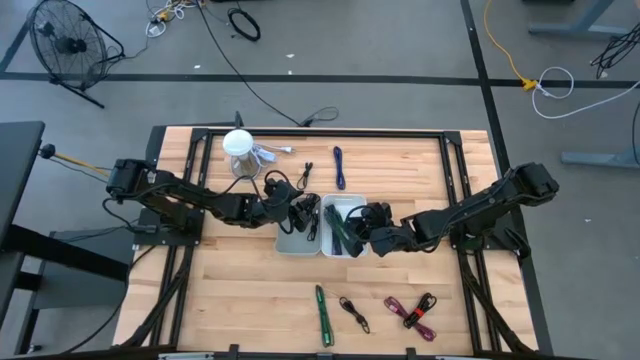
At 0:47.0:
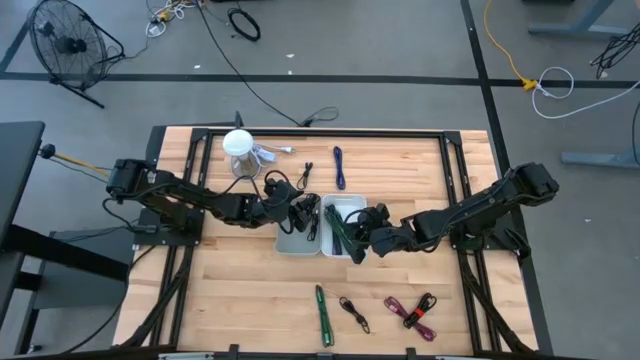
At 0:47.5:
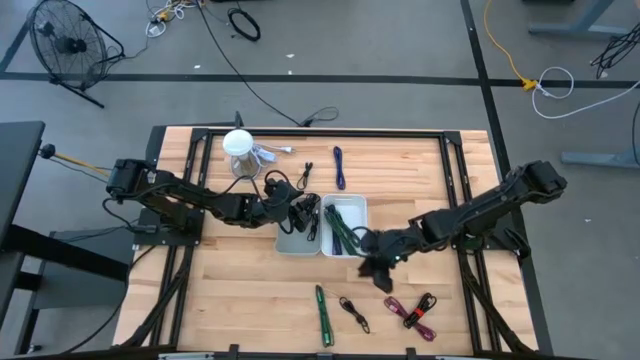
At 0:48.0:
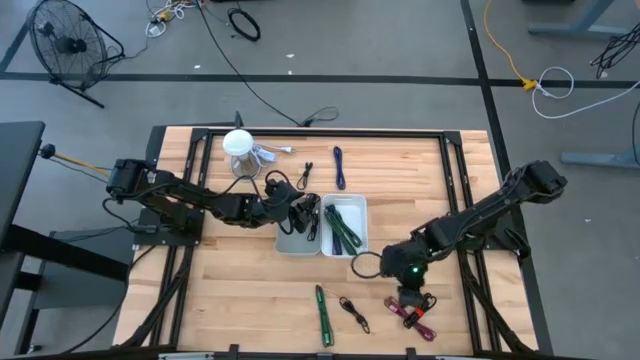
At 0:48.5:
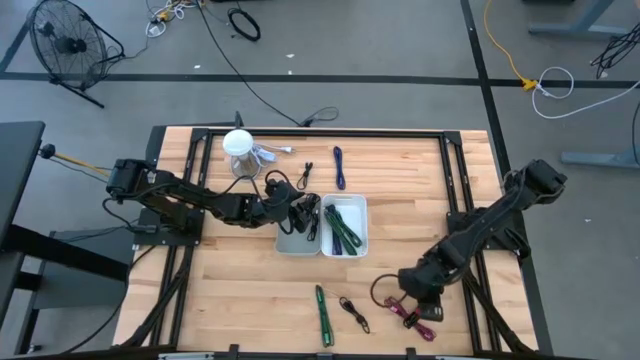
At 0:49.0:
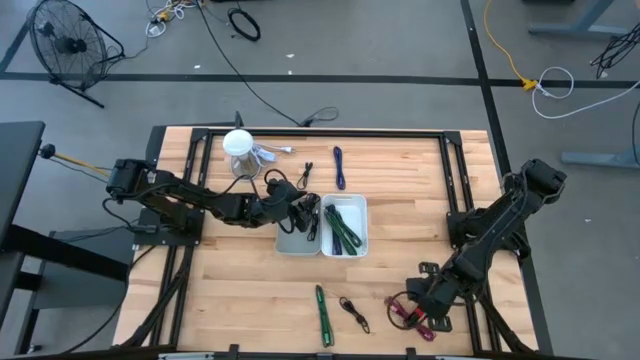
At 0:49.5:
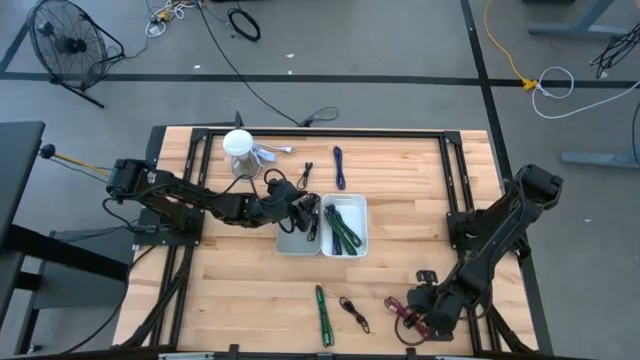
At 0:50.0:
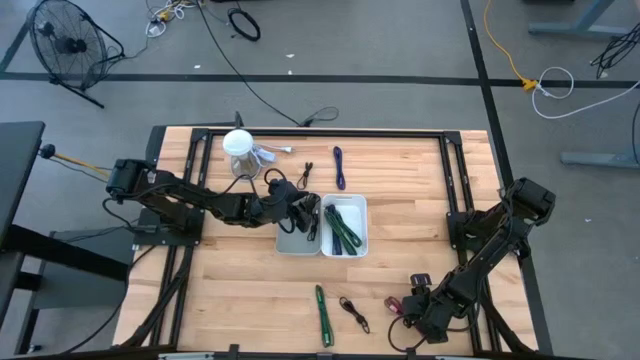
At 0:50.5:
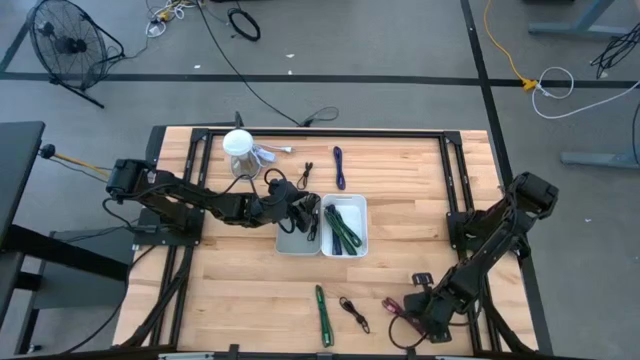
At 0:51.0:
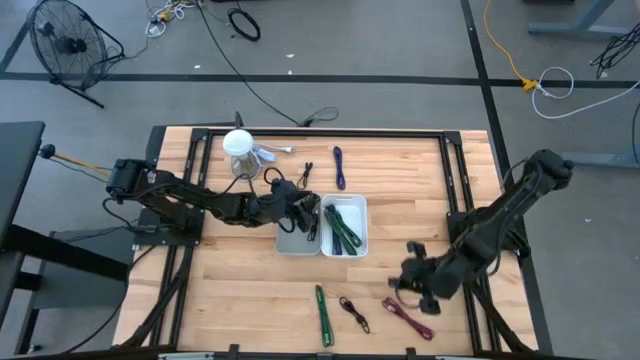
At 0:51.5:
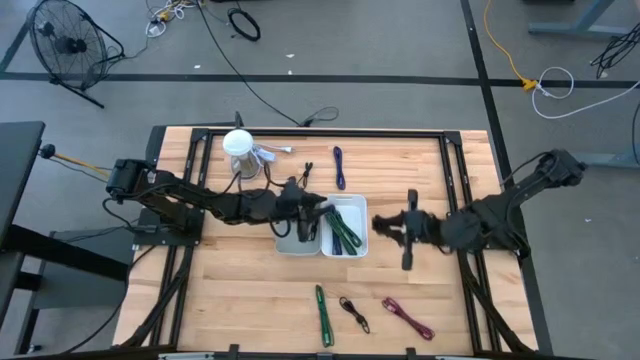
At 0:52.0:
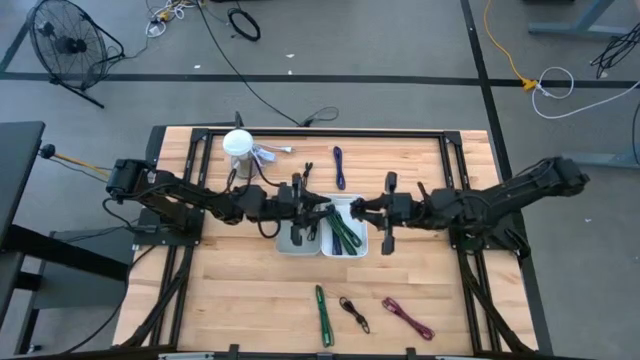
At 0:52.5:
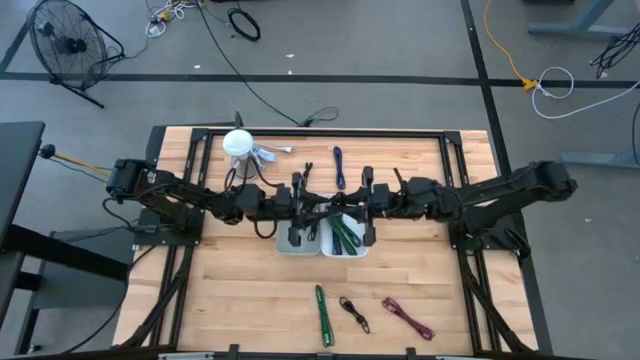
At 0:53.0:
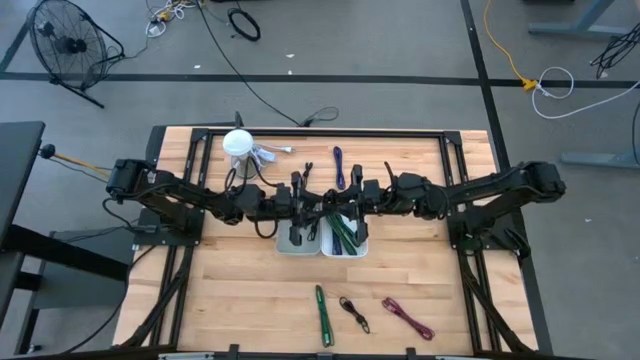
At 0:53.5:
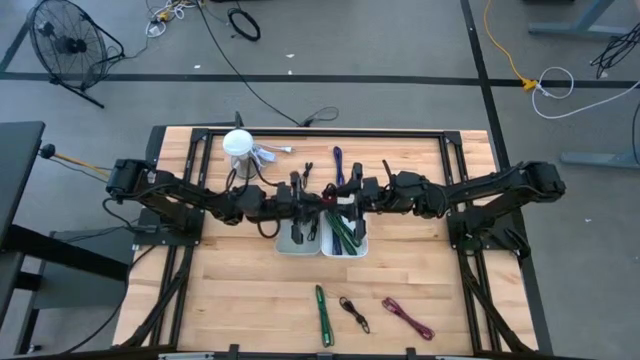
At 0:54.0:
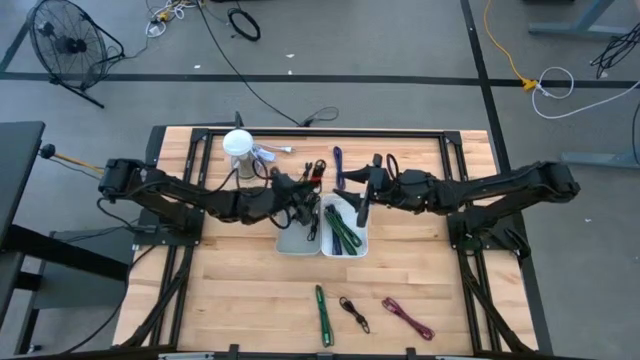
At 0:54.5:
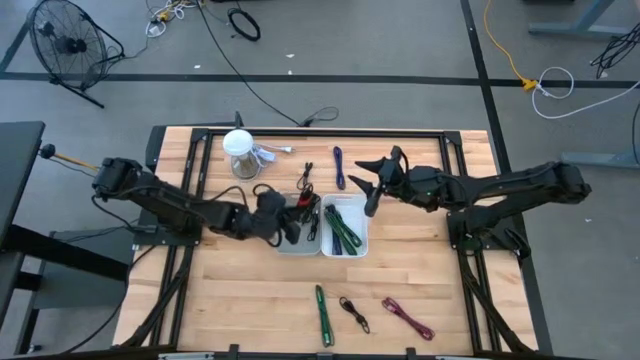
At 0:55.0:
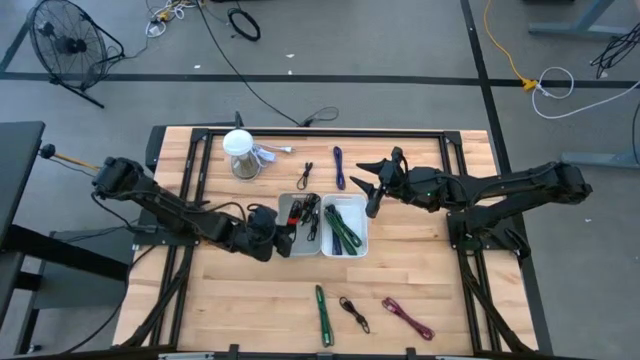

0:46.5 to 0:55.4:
Task: Pick & Place USB Port
Put the black charger cable into the gray bin

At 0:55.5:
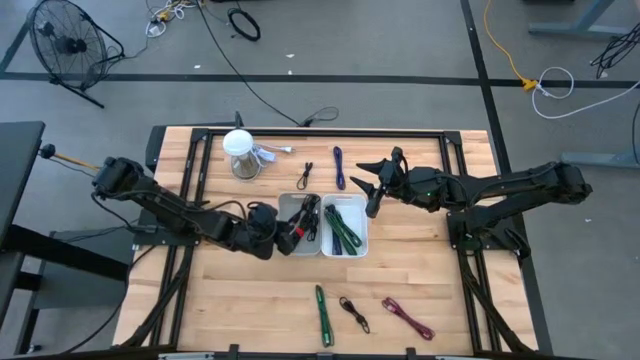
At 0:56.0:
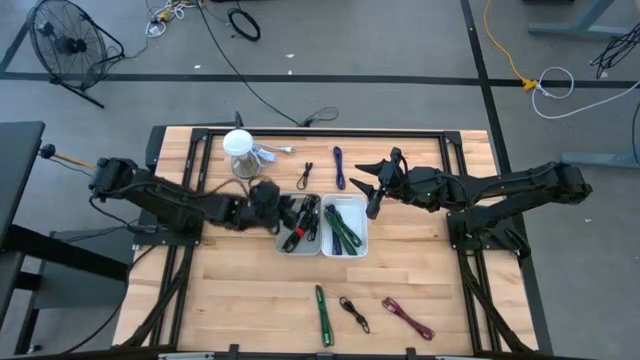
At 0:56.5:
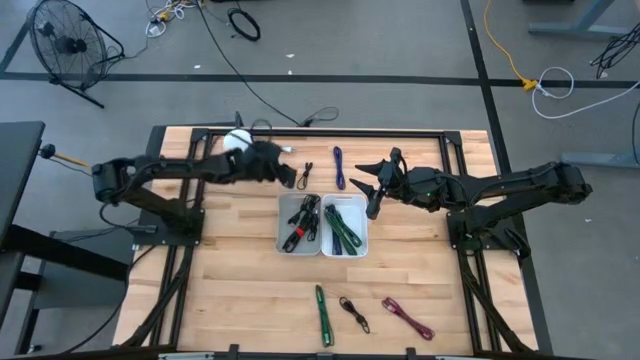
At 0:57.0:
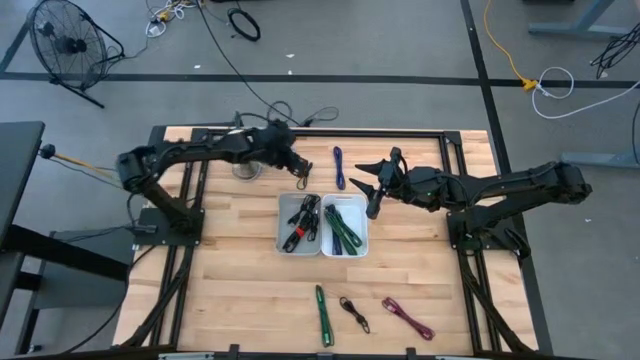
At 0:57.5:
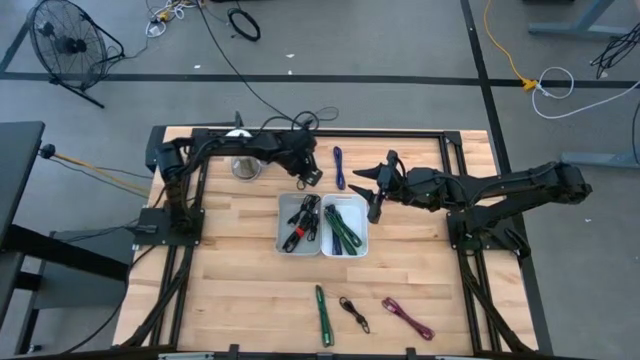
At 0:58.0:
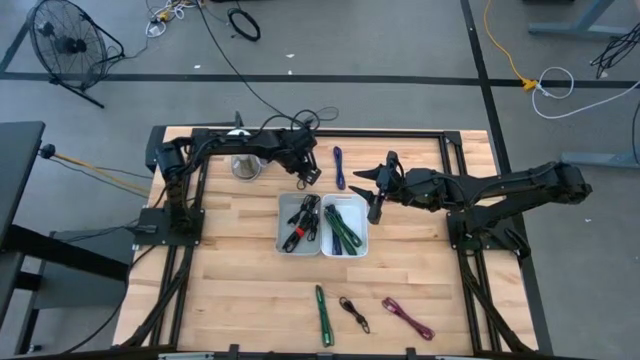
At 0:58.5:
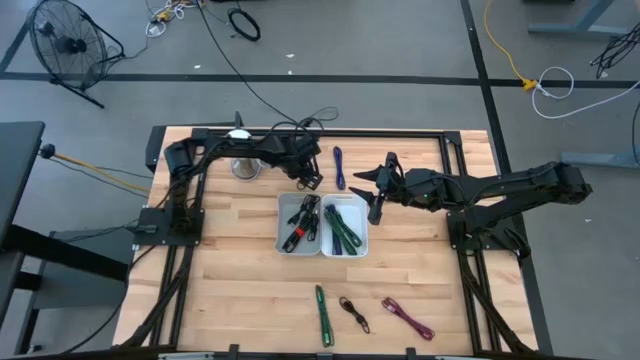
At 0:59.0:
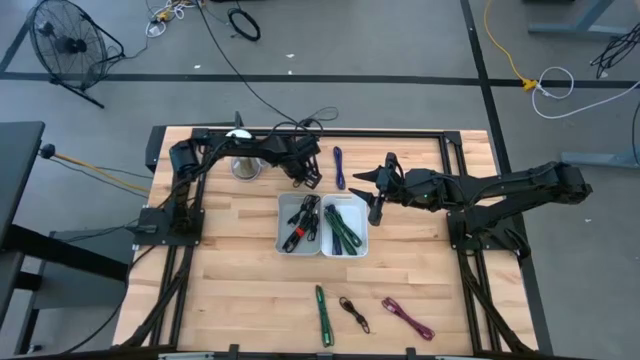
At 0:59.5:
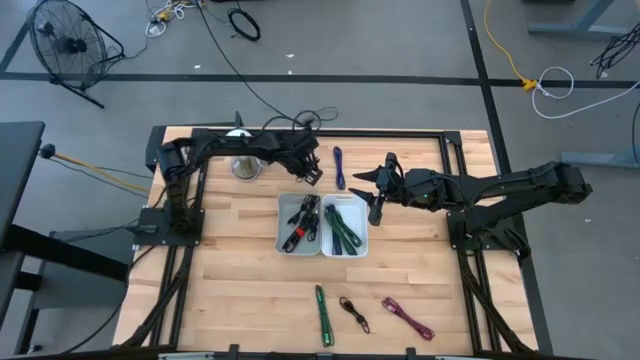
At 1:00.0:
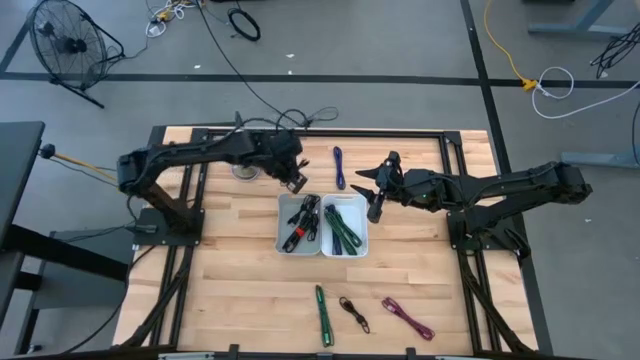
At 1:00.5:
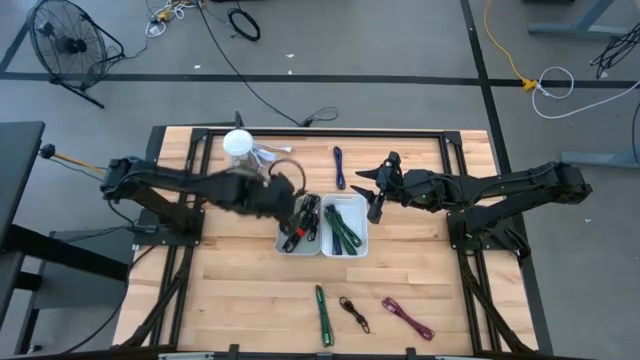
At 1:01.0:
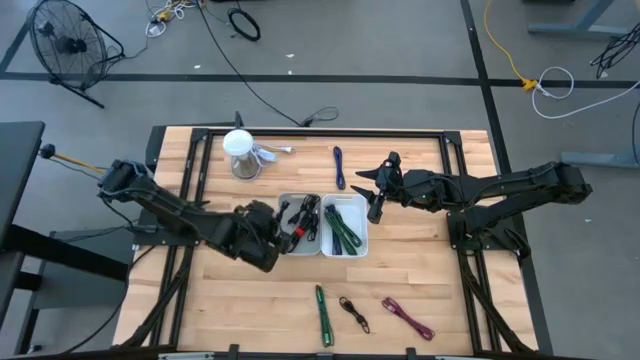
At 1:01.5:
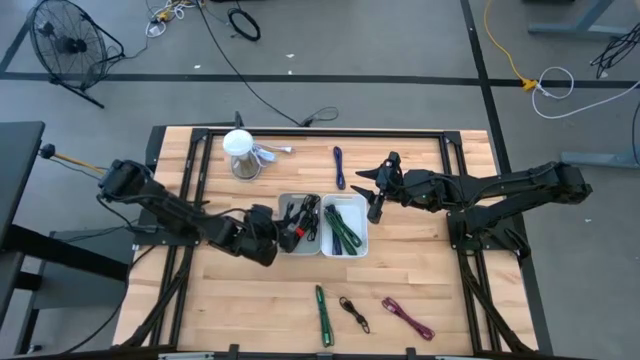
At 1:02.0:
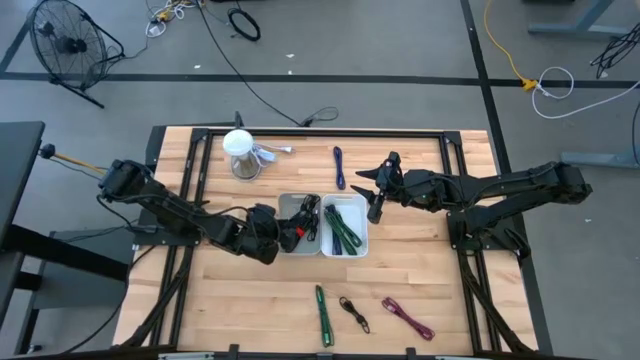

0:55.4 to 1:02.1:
Put the black charger cable into the gray bin

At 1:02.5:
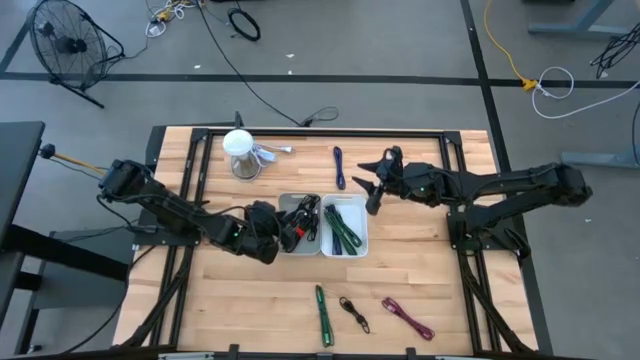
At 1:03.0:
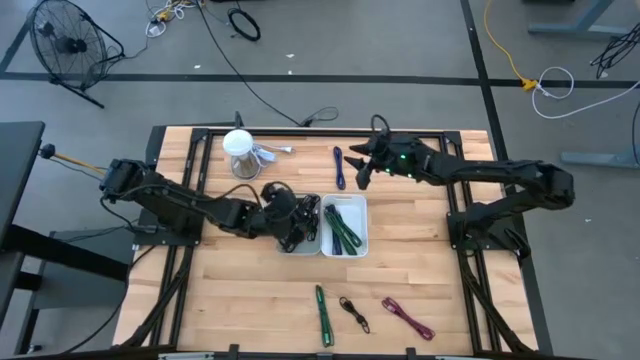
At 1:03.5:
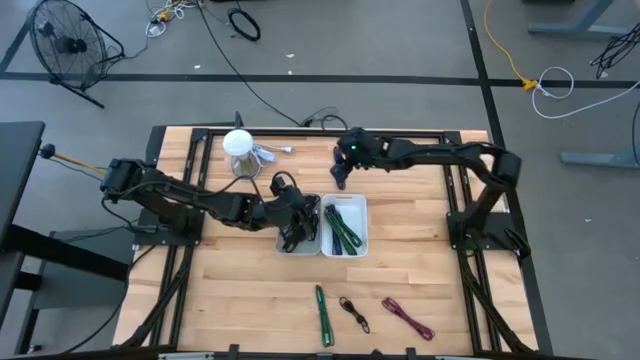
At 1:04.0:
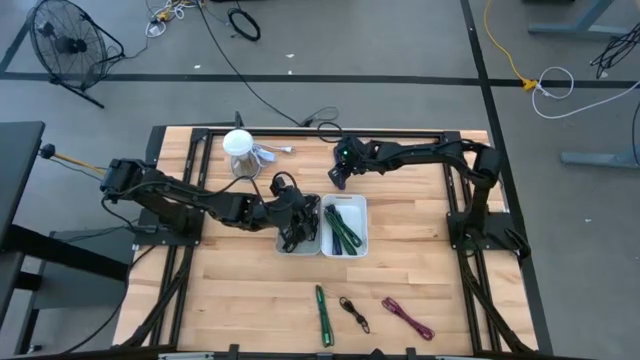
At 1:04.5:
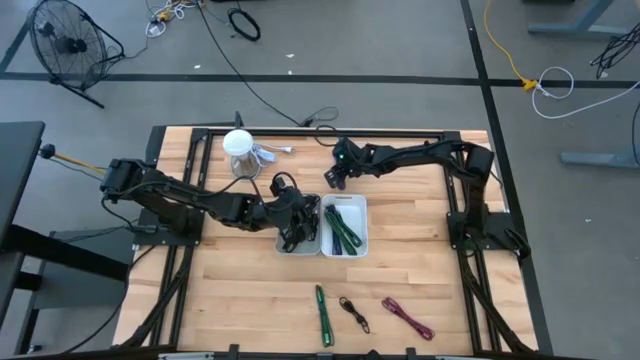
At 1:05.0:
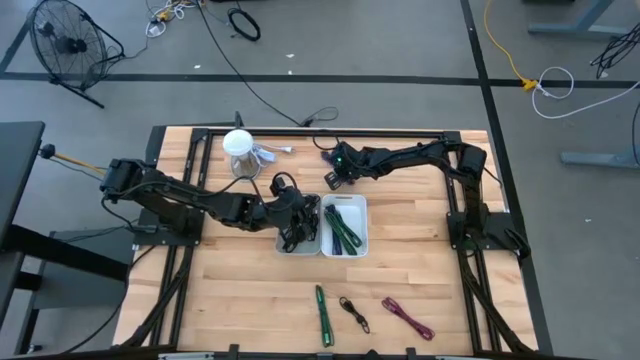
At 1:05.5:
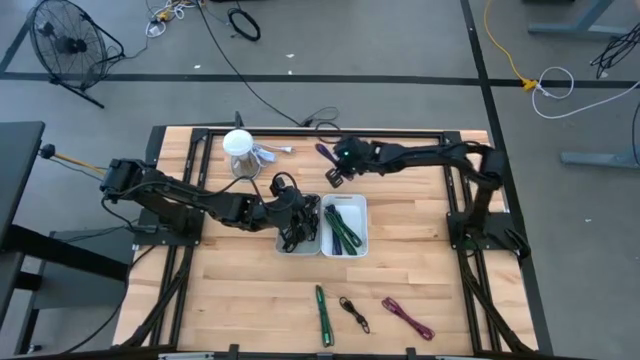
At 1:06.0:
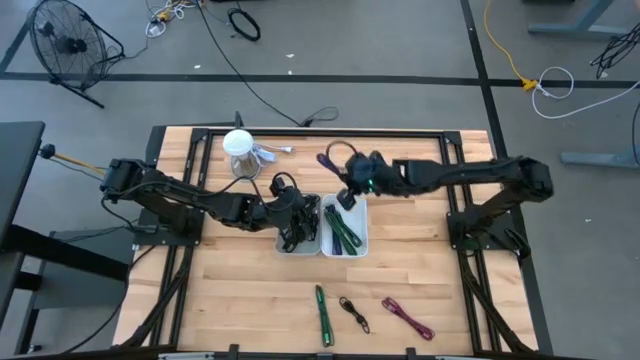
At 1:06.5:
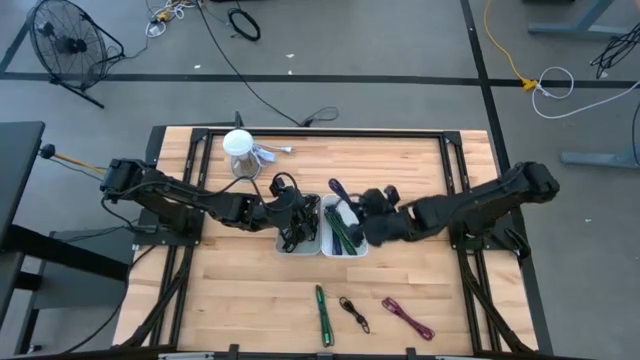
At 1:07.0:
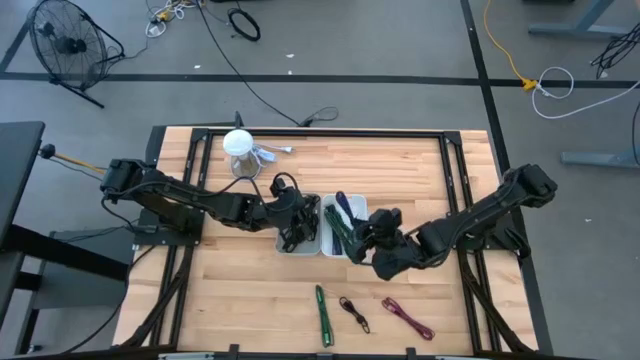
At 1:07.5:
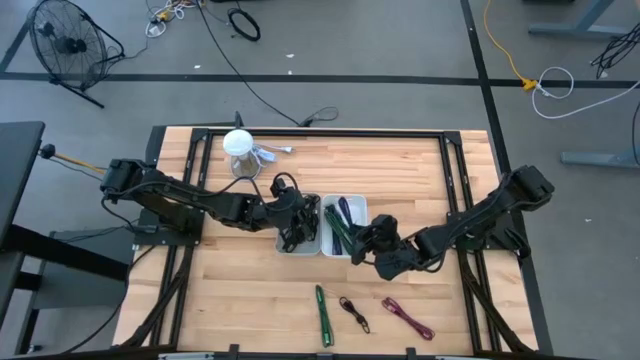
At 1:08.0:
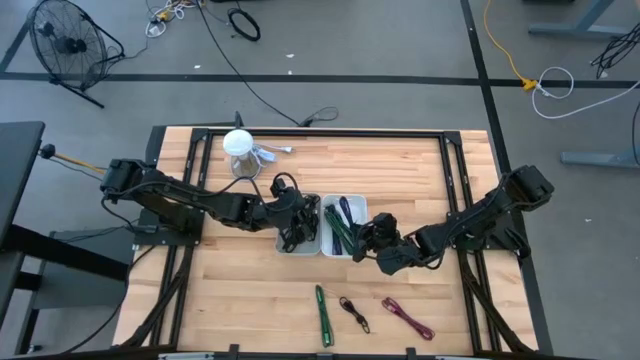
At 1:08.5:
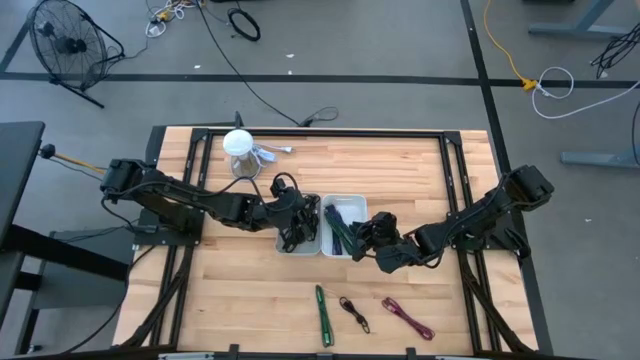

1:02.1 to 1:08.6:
Put the purple charger cable into the white bin
